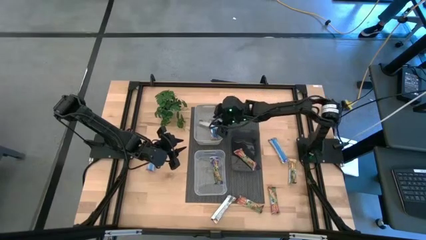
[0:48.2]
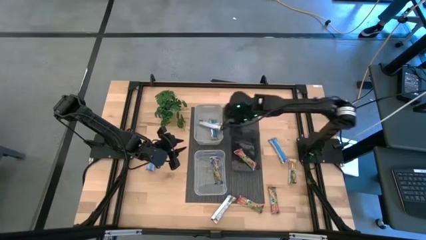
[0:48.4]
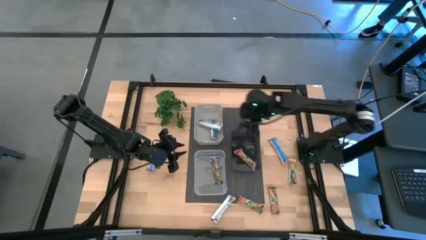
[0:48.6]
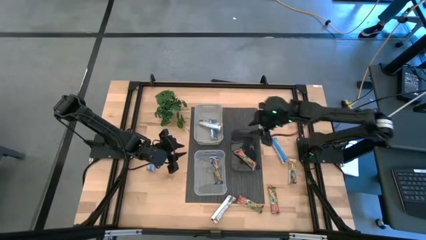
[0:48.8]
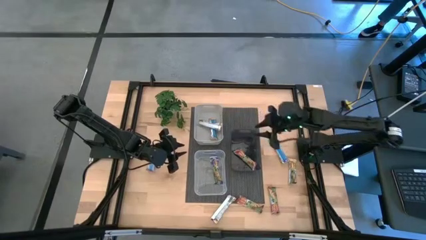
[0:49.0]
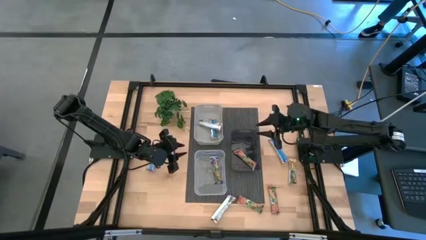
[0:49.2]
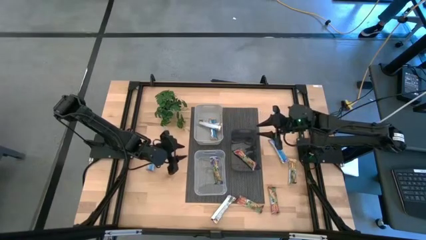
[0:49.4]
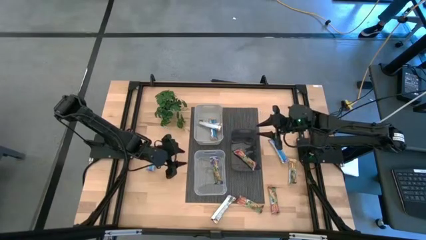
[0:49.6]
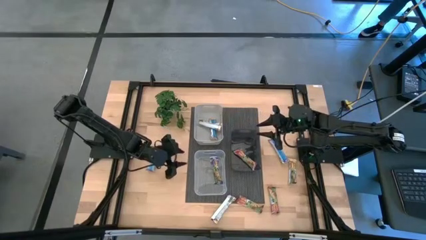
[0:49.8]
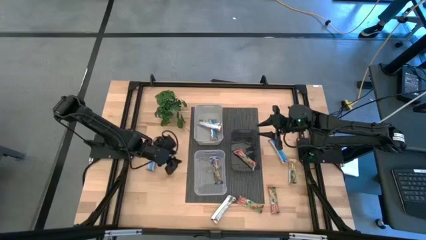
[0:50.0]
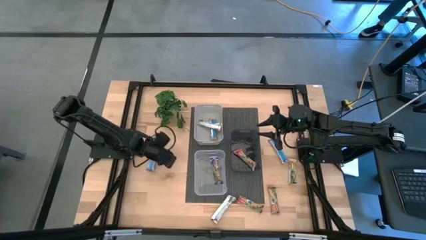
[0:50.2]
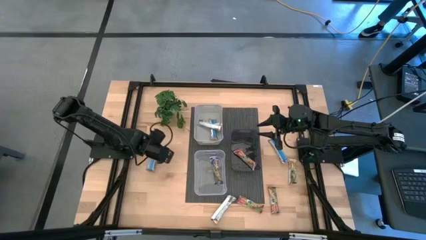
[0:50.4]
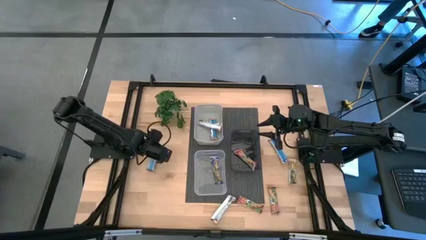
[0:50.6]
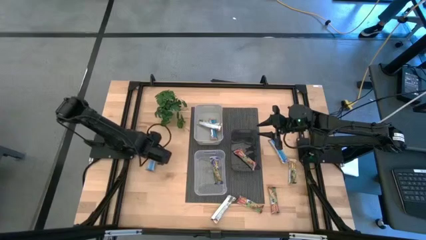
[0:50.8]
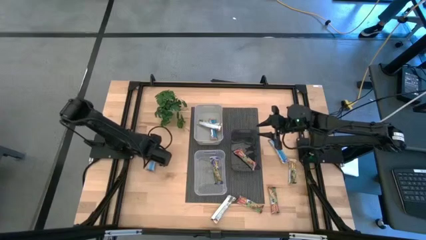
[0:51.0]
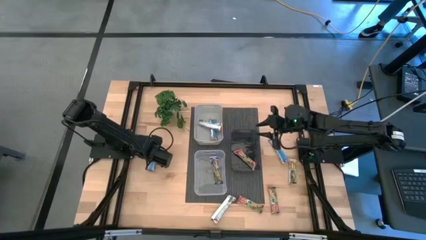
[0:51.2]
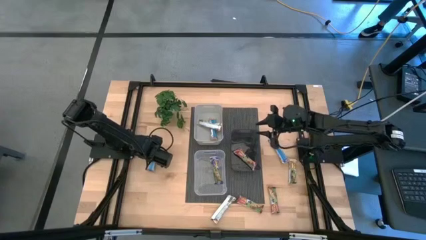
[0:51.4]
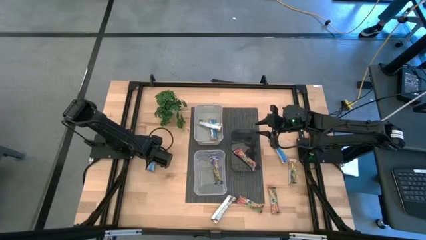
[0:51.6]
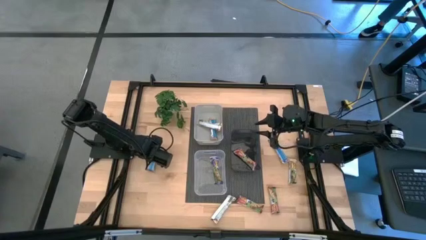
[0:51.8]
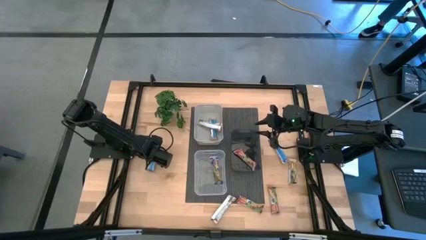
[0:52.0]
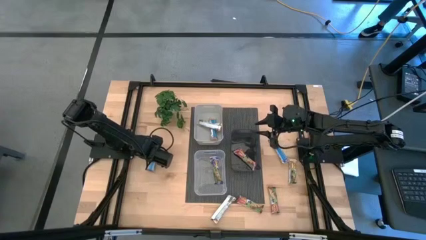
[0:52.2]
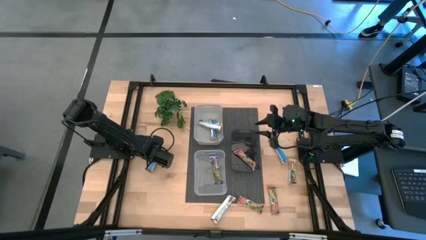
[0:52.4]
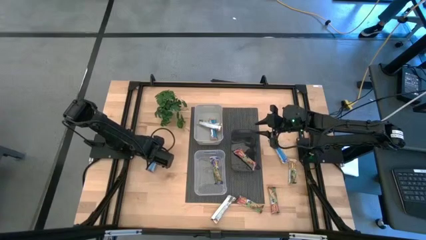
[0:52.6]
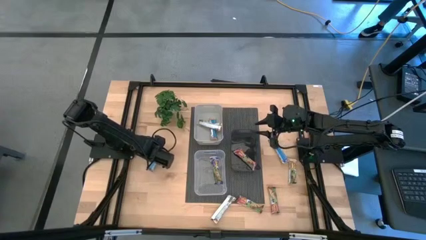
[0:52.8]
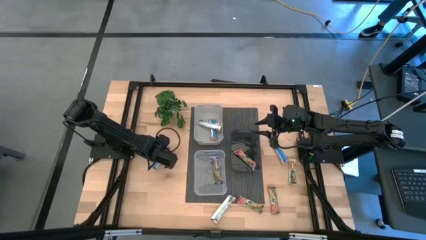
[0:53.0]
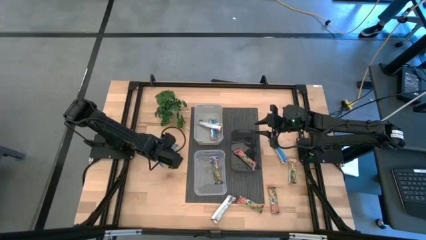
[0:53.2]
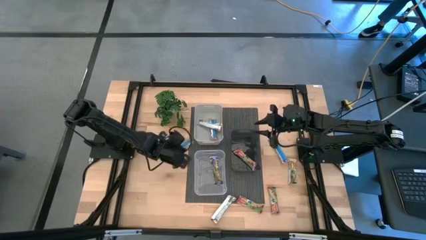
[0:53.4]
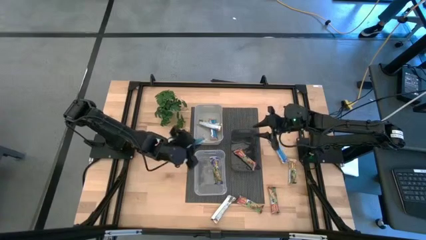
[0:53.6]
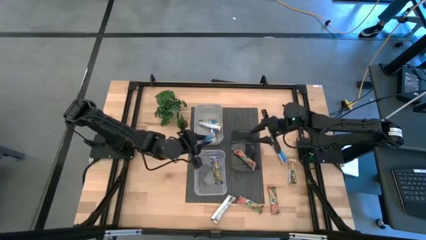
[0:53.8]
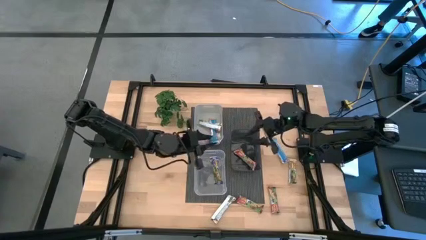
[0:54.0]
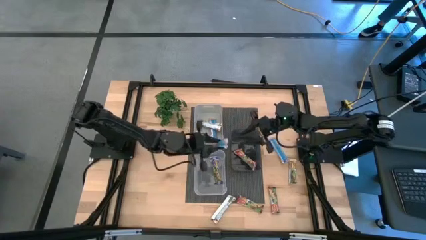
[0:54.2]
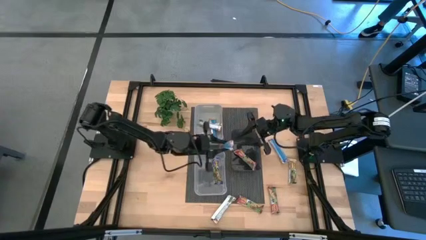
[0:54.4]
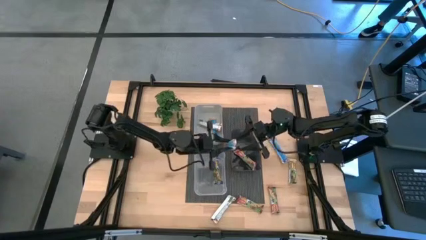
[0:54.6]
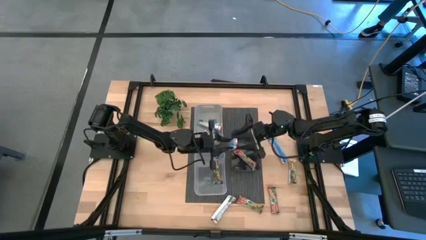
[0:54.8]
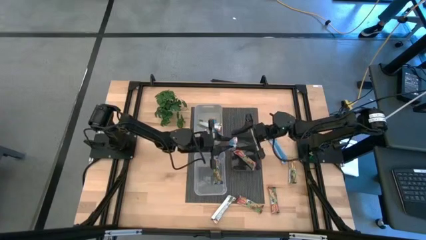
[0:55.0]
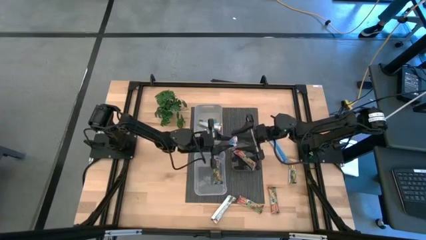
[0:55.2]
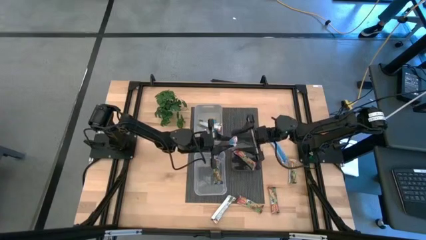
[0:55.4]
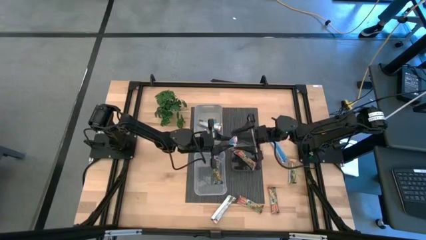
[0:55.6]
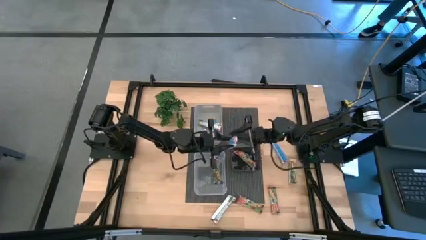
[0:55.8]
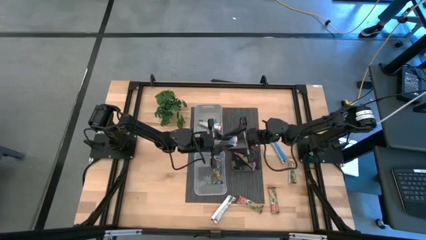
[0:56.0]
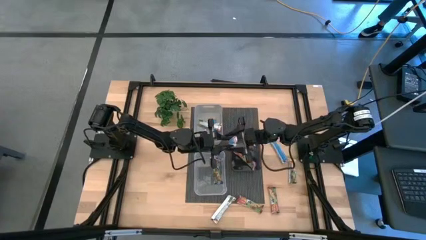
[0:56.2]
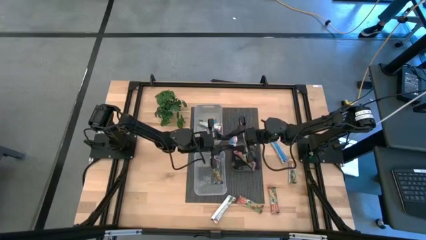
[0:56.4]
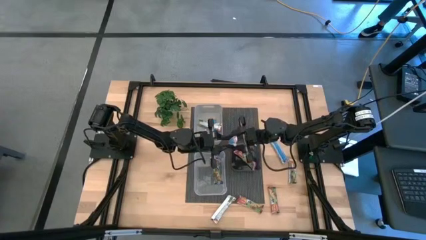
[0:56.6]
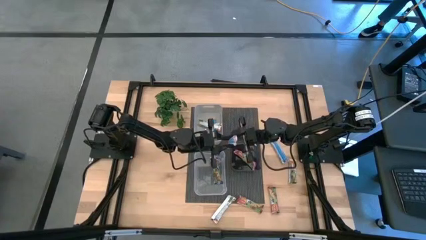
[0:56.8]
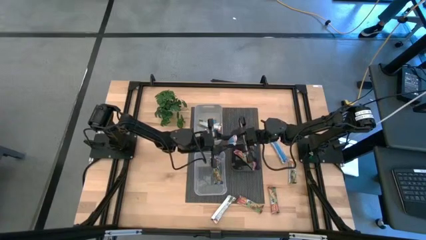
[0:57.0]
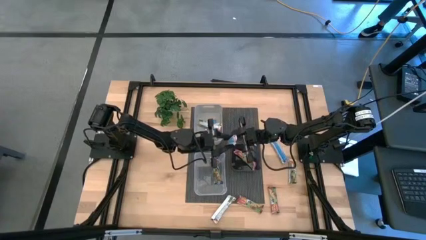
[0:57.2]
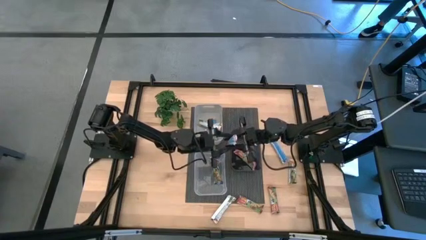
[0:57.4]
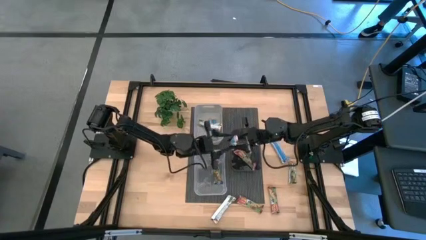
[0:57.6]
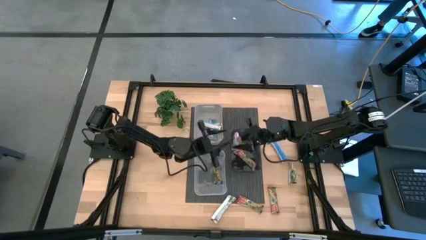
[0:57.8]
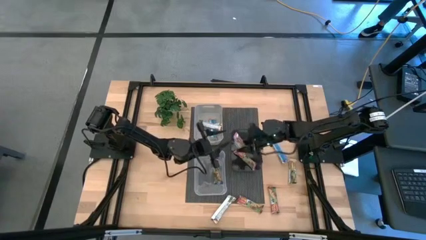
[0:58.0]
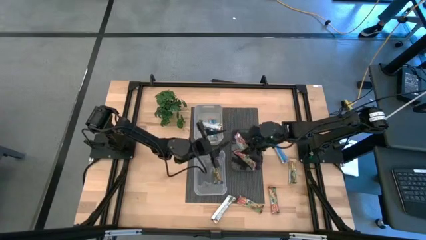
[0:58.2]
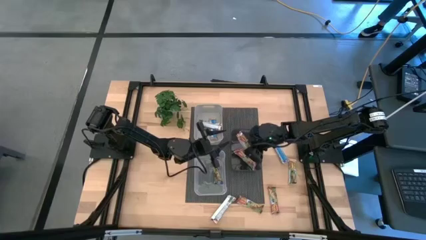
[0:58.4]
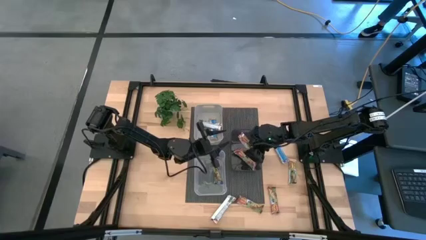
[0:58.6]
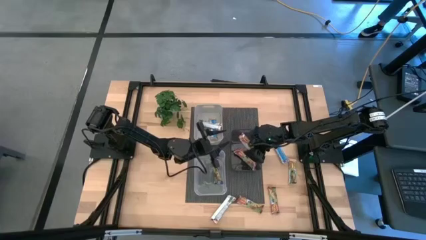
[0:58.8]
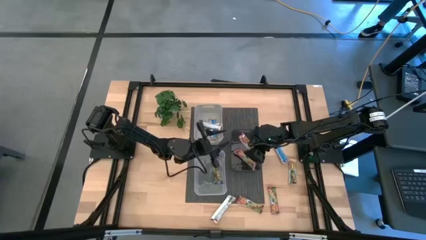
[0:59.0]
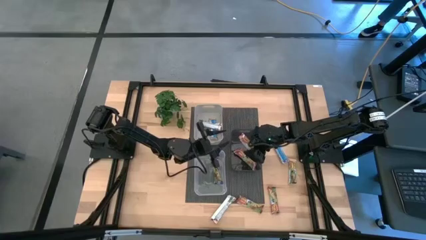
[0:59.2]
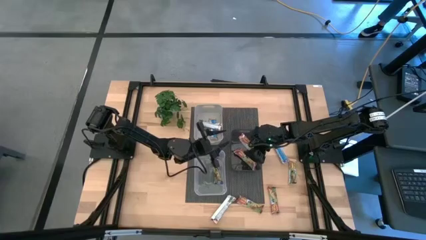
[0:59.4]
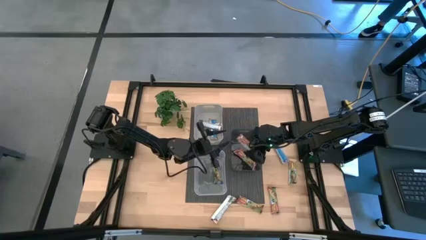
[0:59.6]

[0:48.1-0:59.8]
Task: Pick and place Granola Bars by type
Put the red granola bar into the black bin
